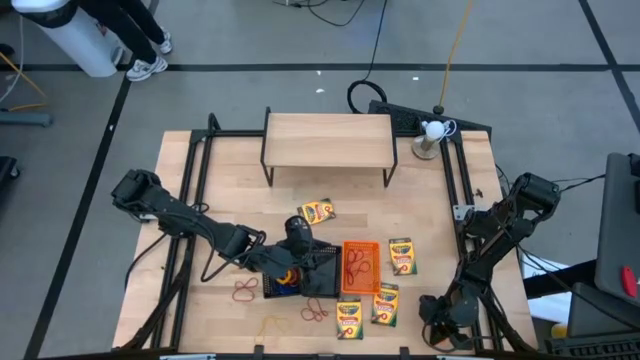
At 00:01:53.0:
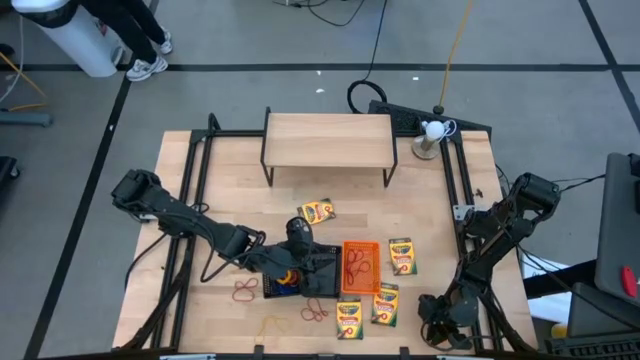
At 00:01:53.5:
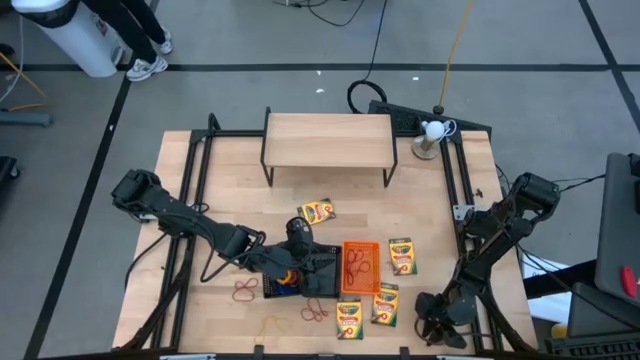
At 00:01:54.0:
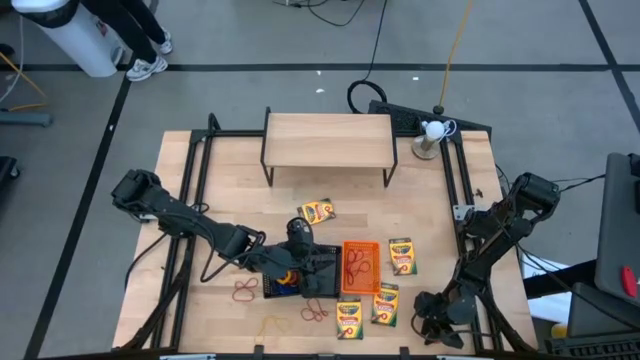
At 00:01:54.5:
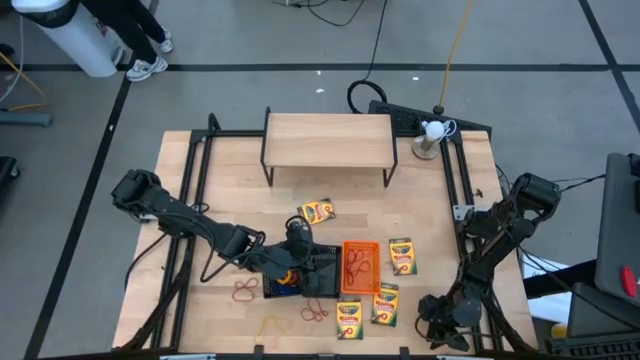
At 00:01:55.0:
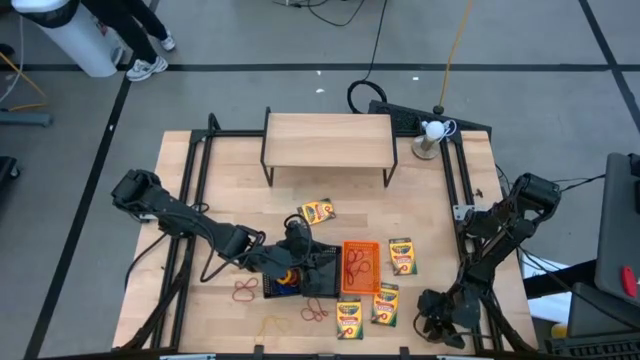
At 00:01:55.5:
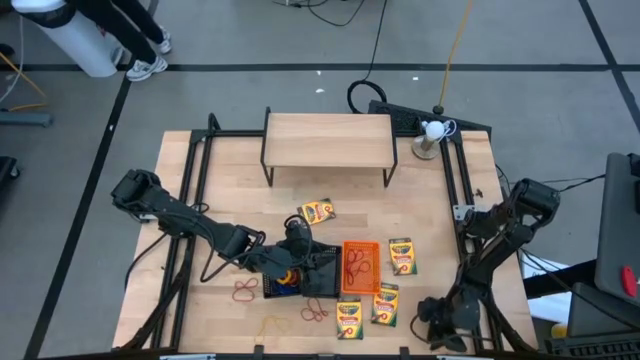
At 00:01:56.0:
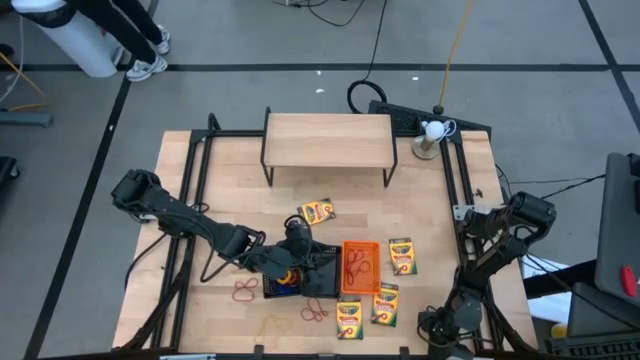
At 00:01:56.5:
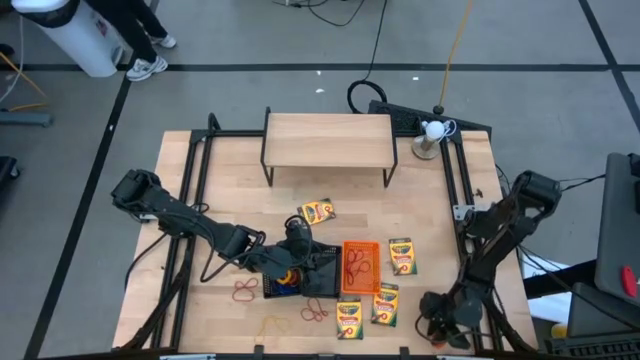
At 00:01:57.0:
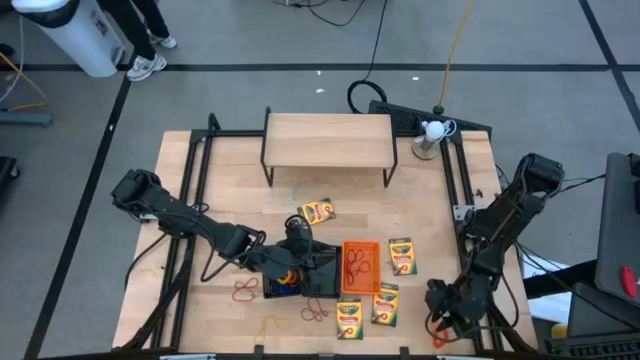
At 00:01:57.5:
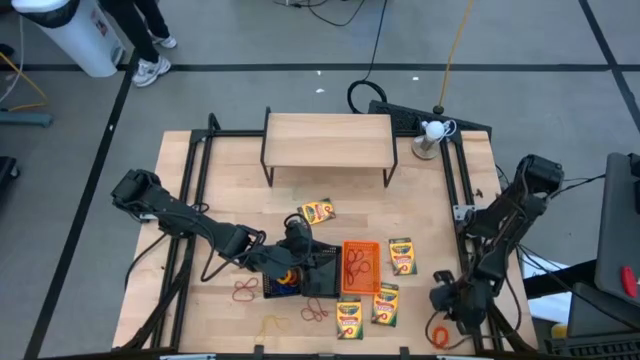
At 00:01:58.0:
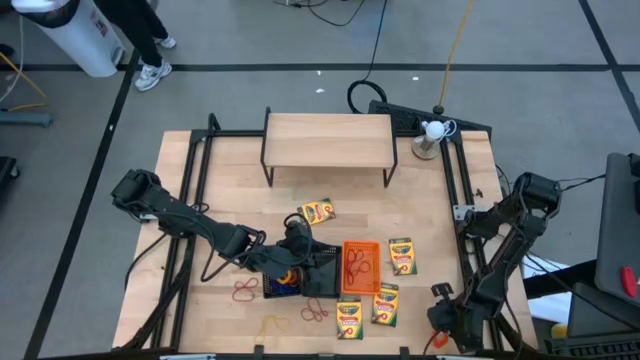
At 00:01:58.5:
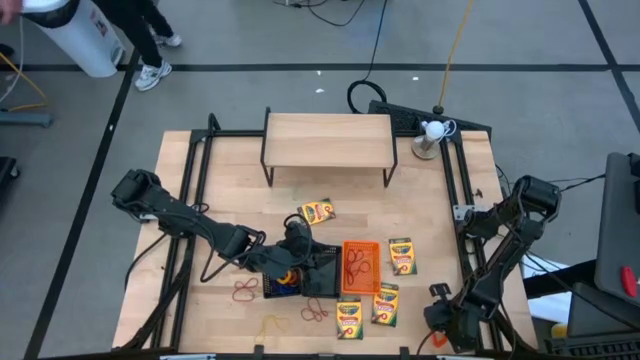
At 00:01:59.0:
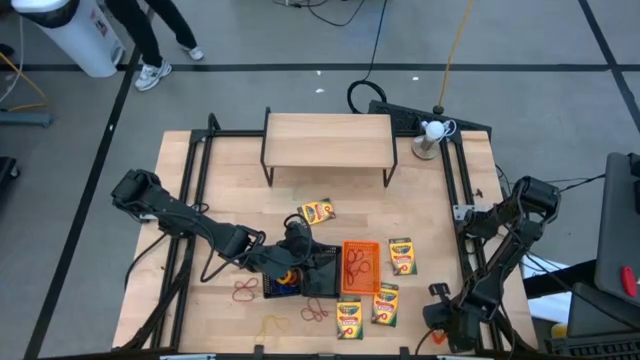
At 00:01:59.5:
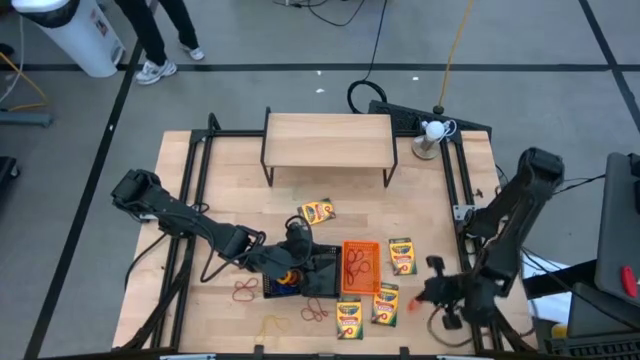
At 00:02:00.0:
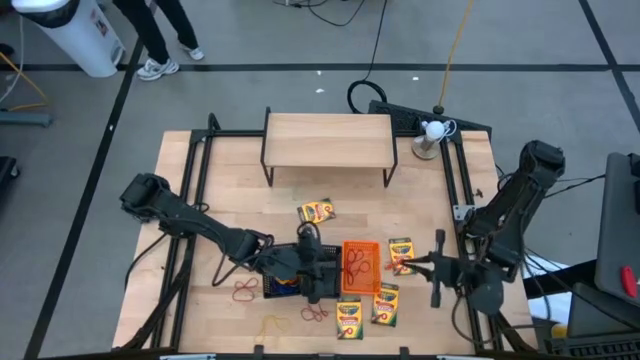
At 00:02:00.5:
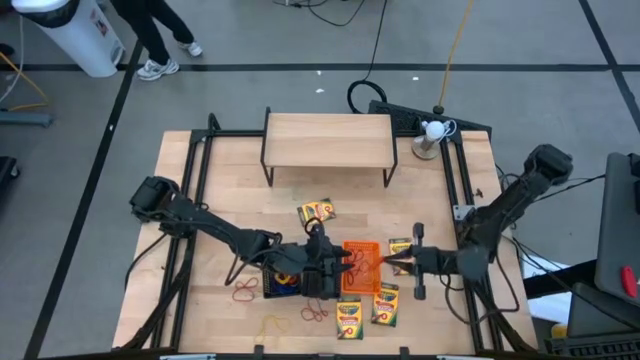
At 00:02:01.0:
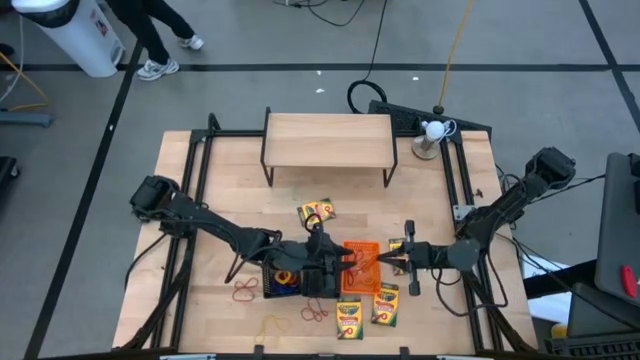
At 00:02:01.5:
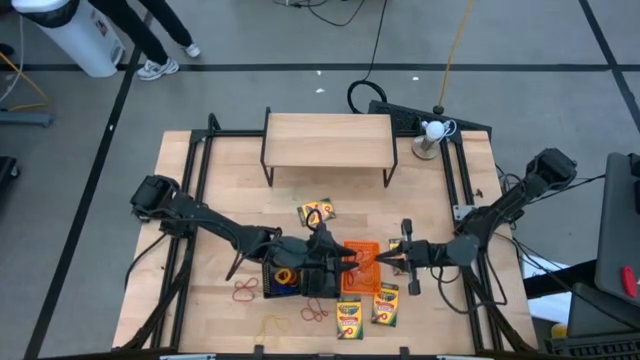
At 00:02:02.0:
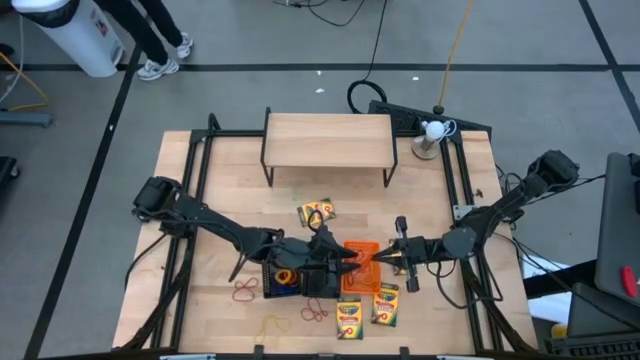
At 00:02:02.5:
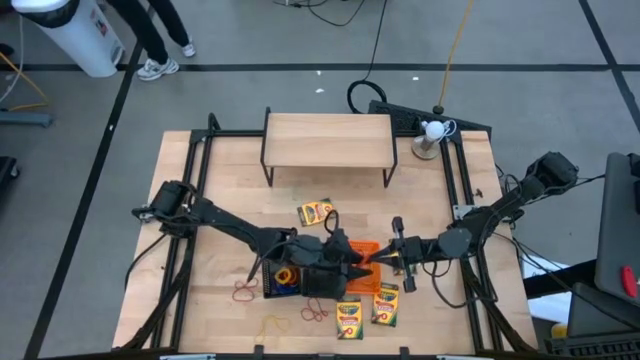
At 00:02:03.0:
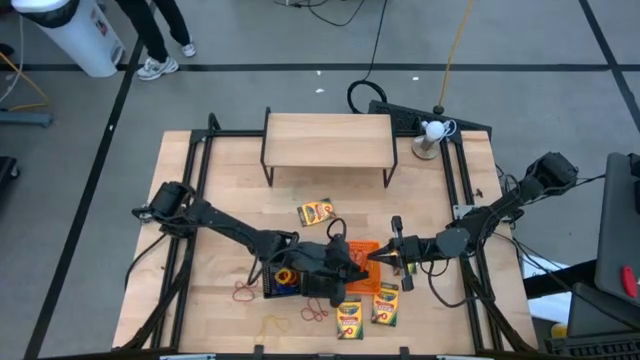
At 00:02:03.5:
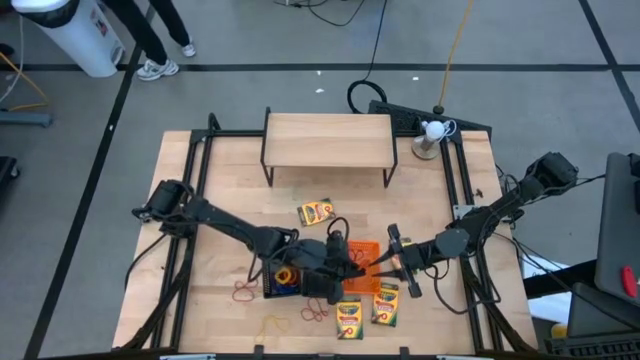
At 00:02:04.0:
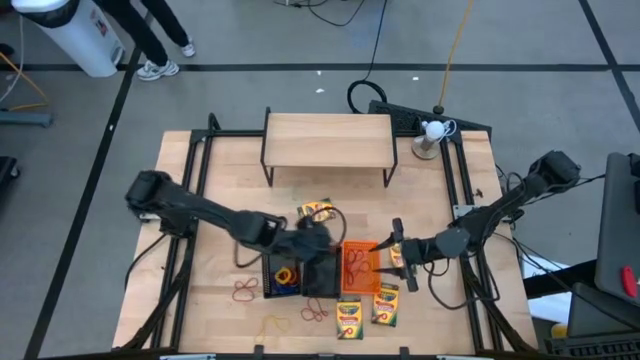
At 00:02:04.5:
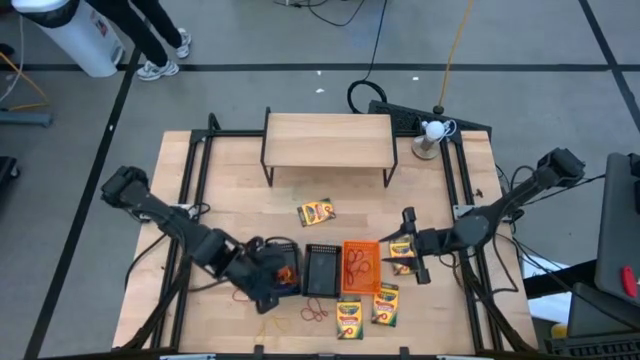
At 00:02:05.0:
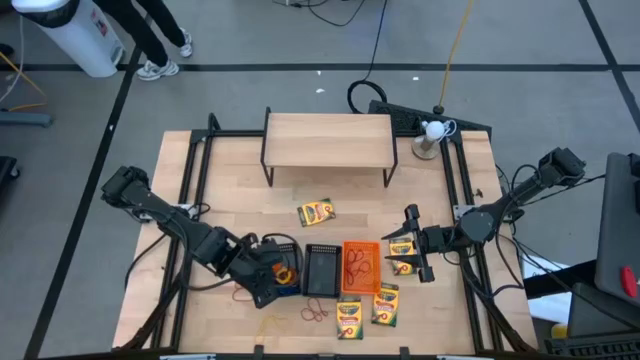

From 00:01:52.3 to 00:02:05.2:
Task: Pick & Place Office Desk Supplies
Put the orange spring keychain into the left black bin

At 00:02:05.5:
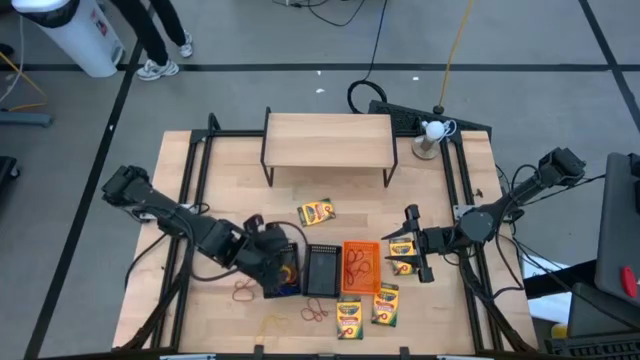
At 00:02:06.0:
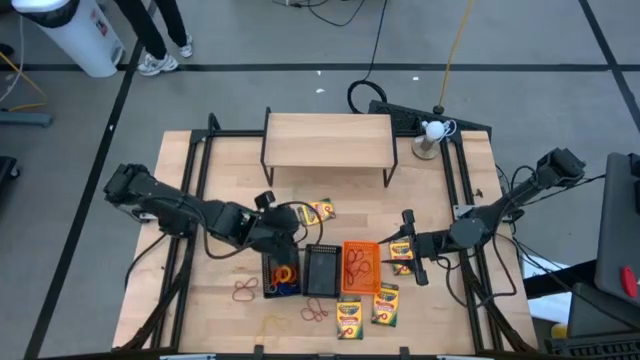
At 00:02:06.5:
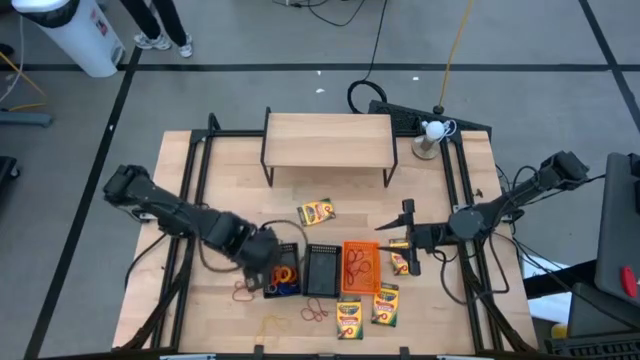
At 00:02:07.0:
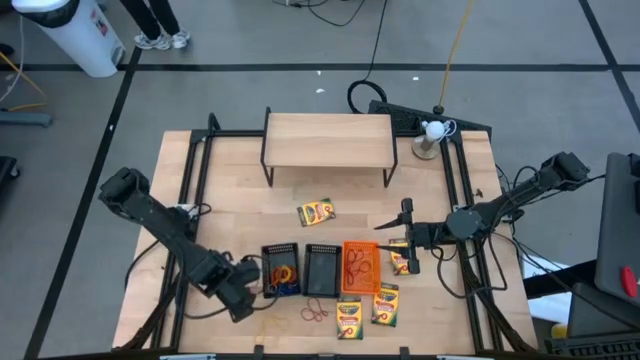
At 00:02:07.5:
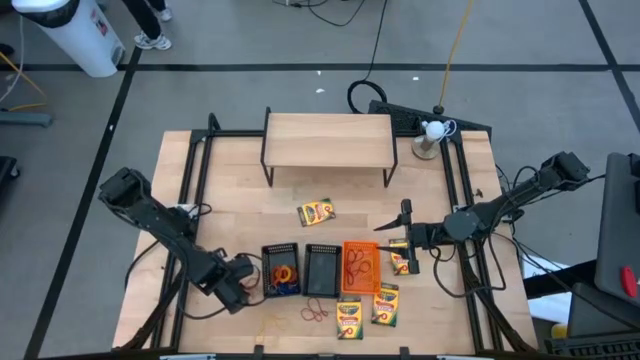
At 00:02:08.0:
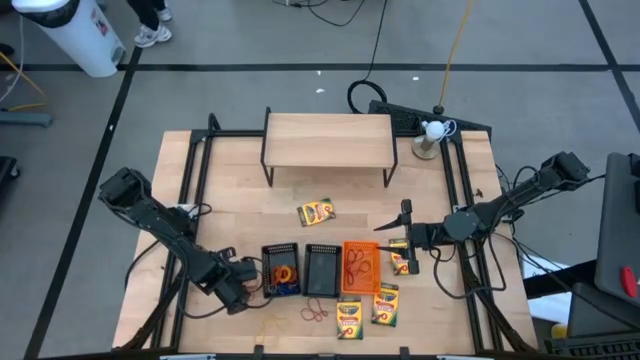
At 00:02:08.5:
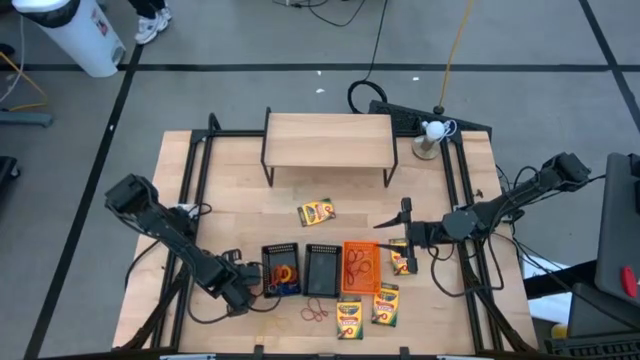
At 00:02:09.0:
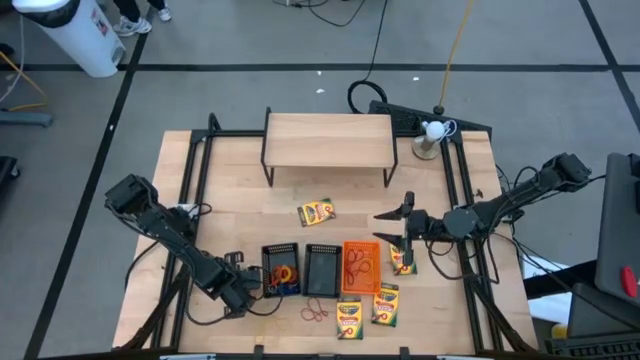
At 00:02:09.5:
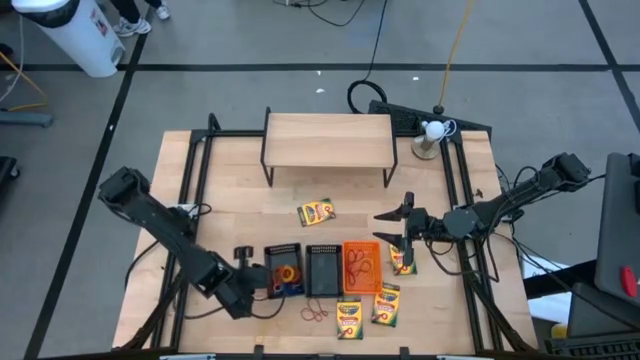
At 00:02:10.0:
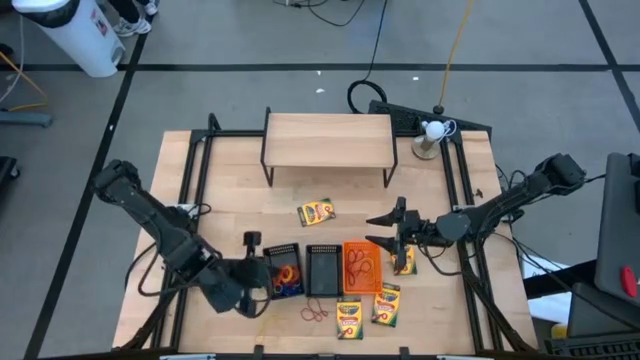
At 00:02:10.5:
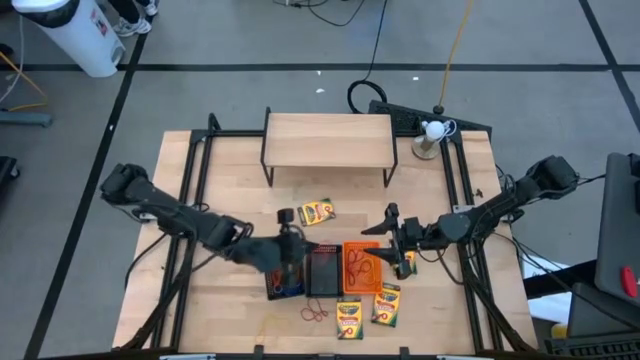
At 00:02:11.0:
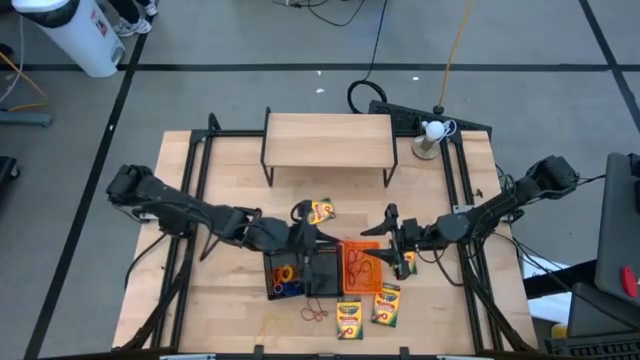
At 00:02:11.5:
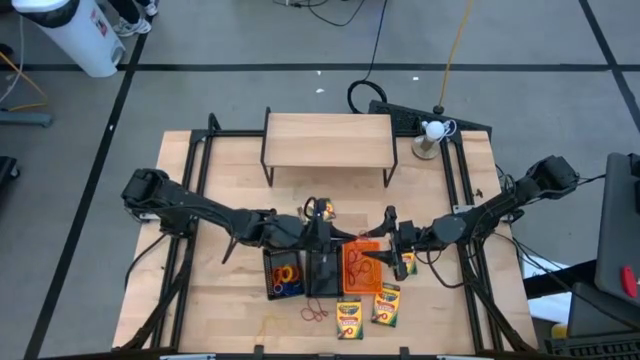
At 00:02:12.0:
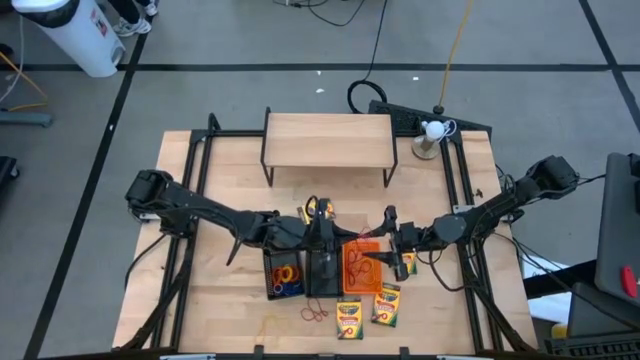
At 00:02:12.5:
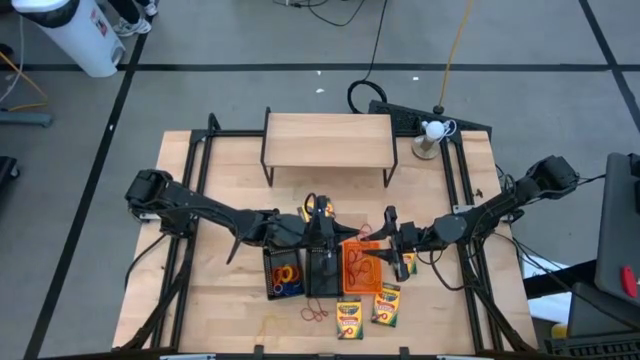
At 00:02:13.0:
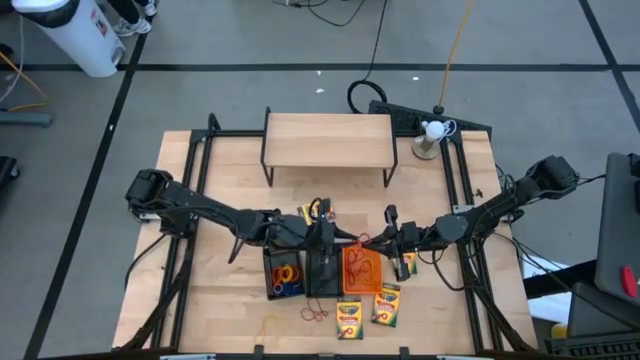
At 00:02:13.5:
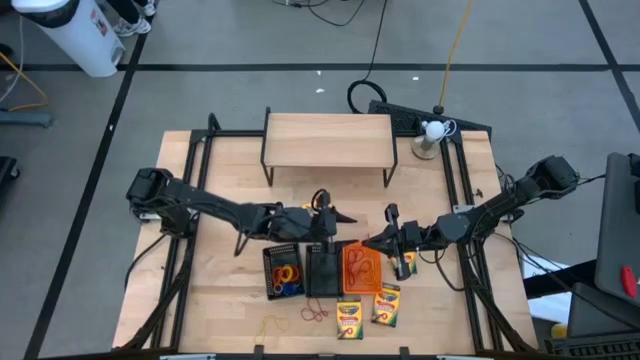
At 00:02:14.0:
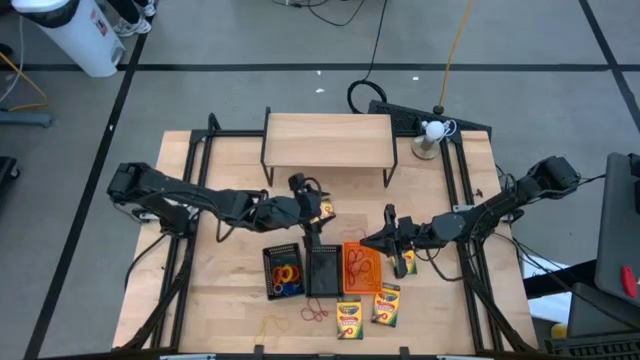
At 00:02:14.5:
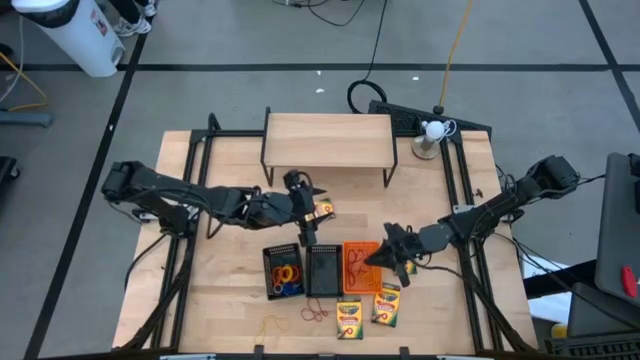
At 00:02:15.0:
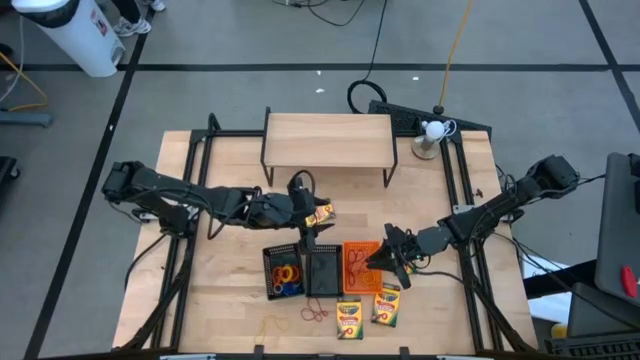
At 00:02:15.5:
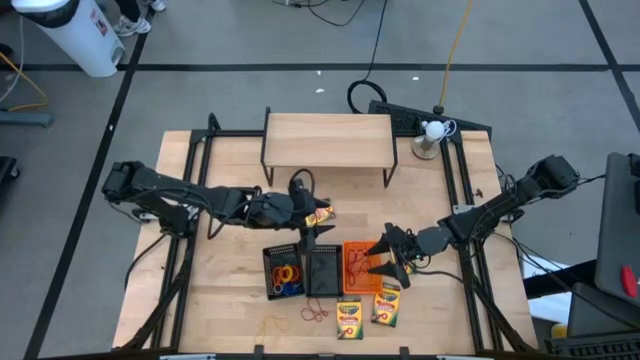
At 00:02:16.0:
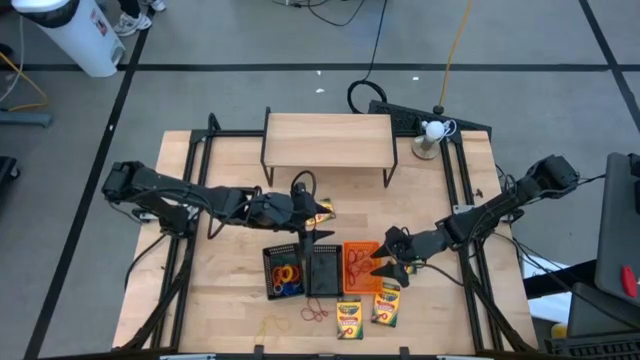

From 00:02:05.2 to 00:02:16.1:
Put the red rubber band into the orange bin
